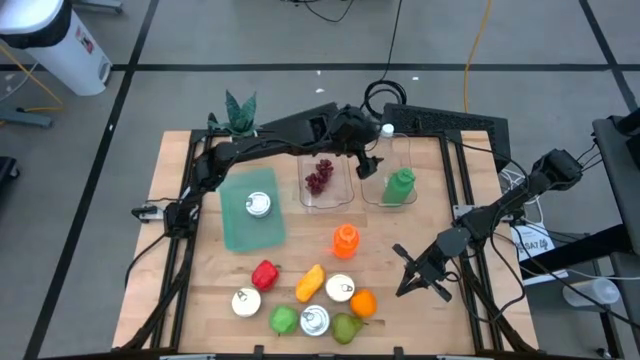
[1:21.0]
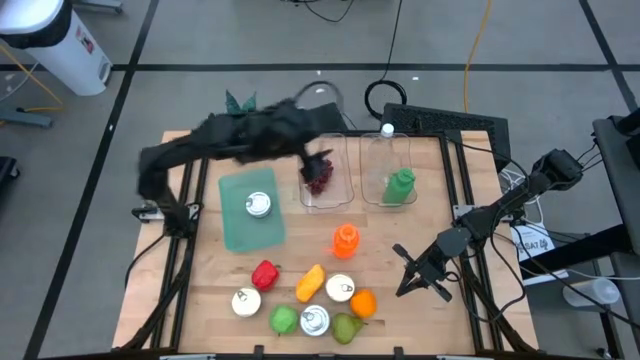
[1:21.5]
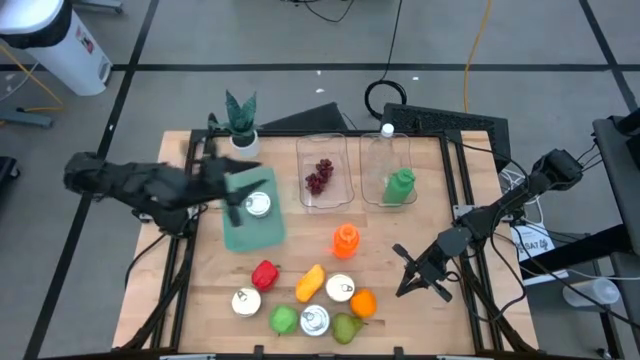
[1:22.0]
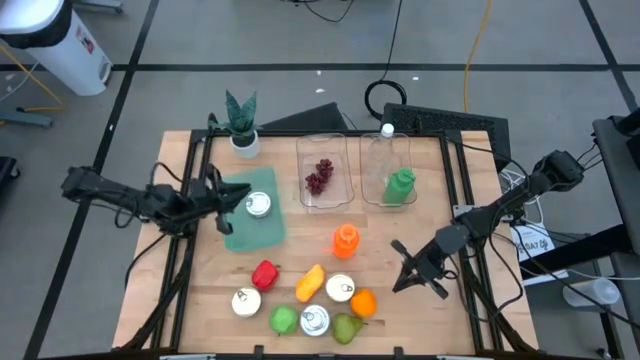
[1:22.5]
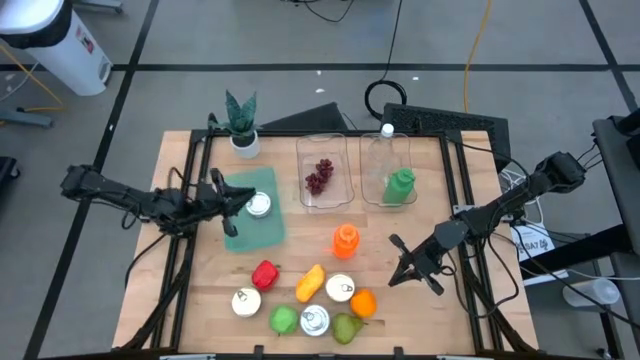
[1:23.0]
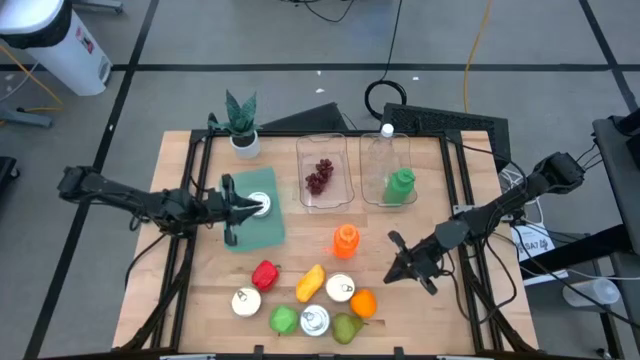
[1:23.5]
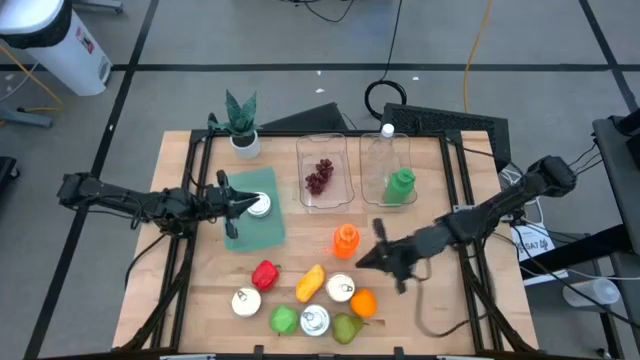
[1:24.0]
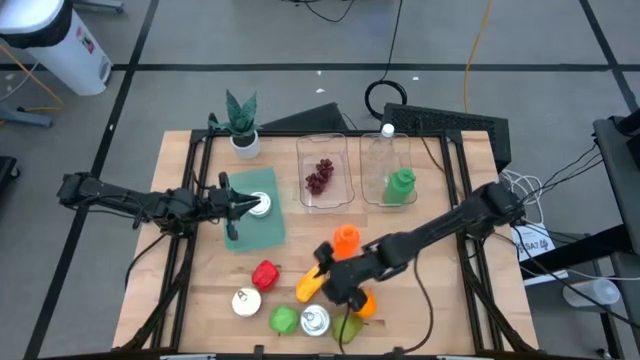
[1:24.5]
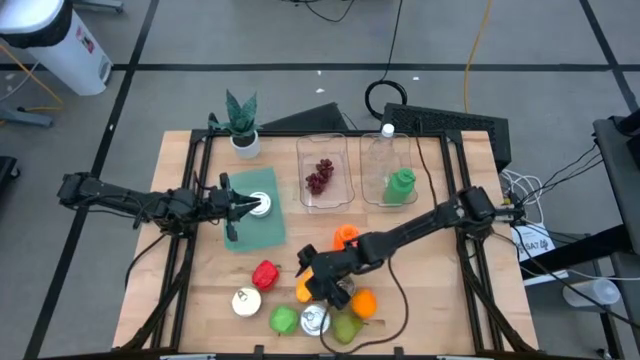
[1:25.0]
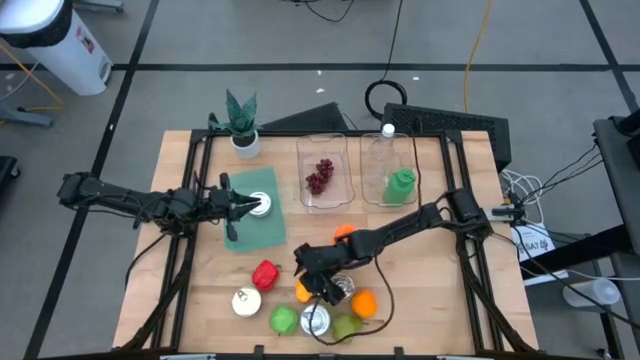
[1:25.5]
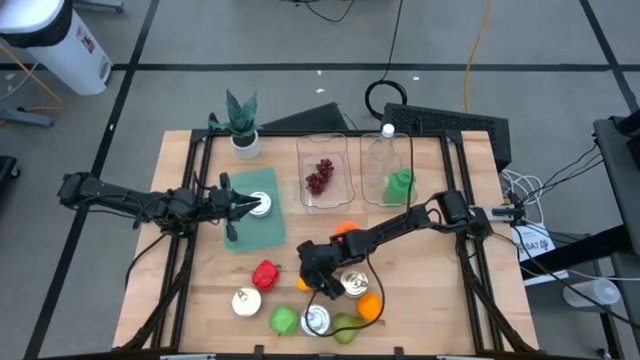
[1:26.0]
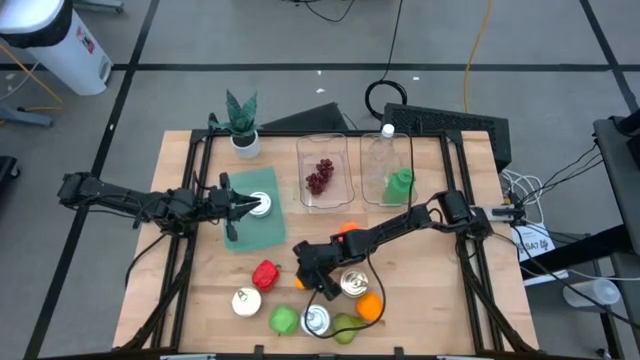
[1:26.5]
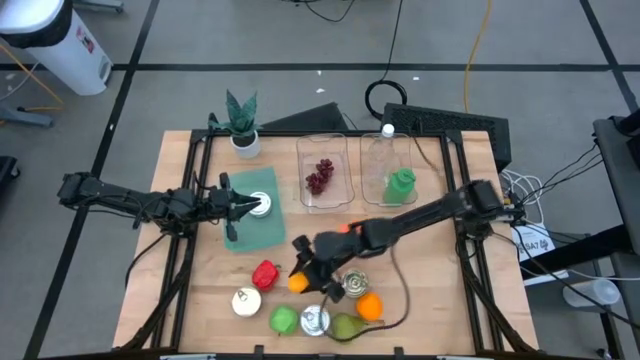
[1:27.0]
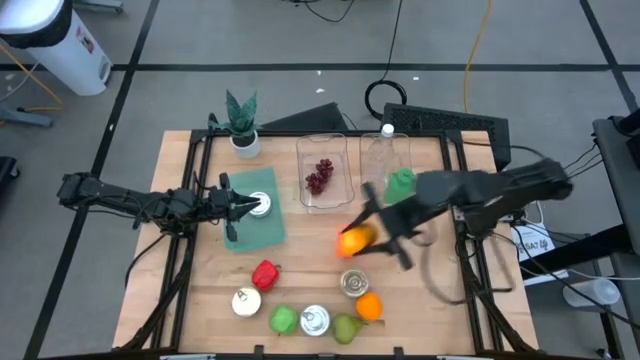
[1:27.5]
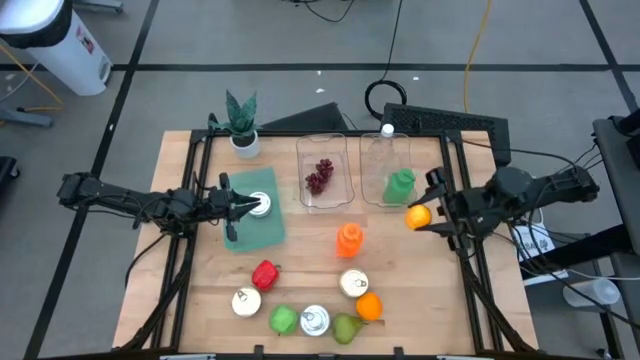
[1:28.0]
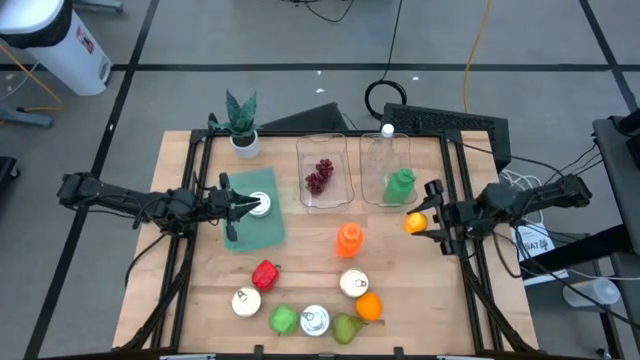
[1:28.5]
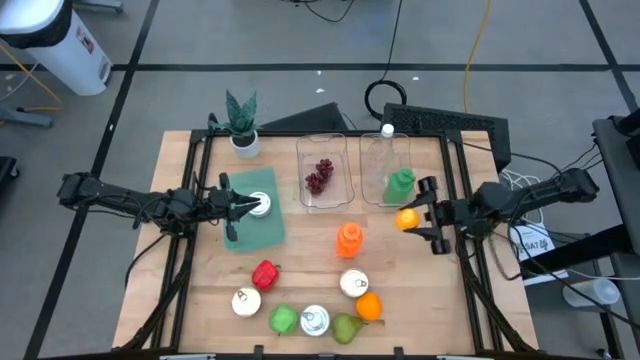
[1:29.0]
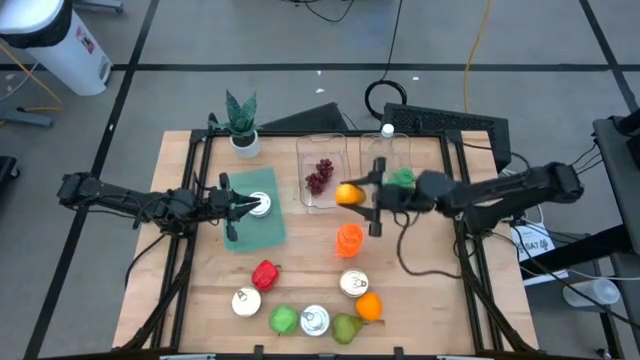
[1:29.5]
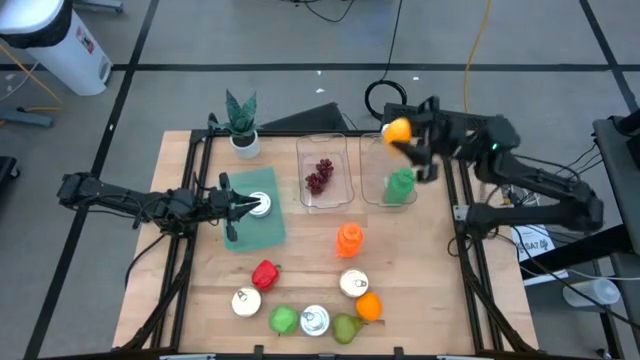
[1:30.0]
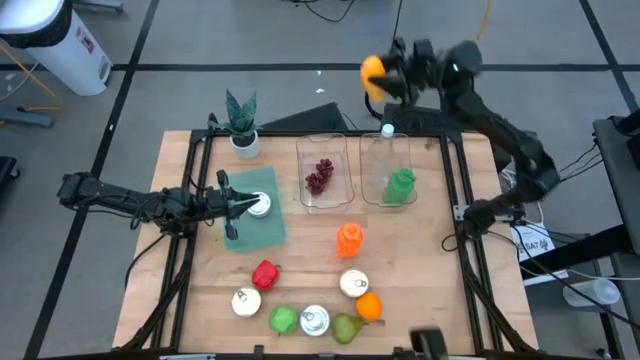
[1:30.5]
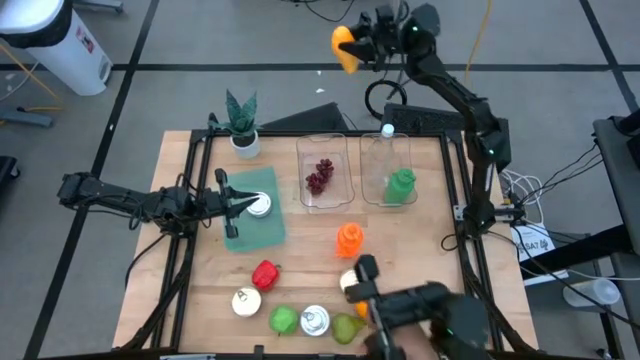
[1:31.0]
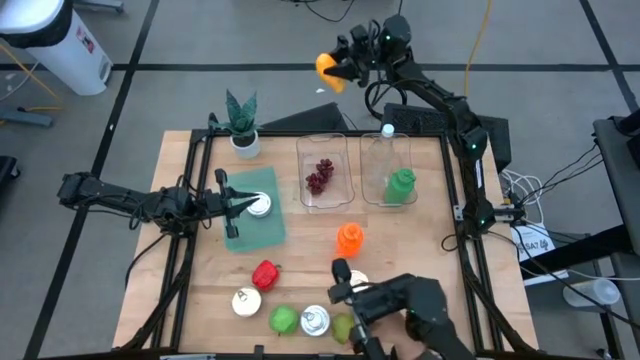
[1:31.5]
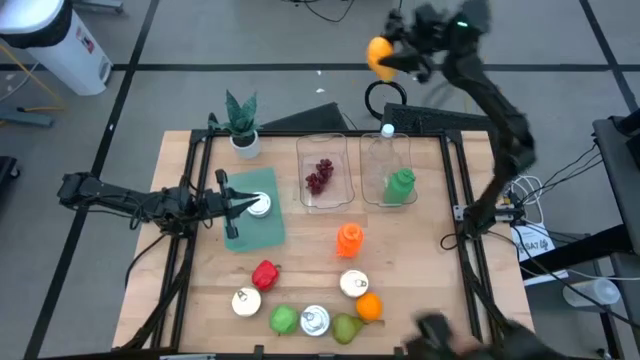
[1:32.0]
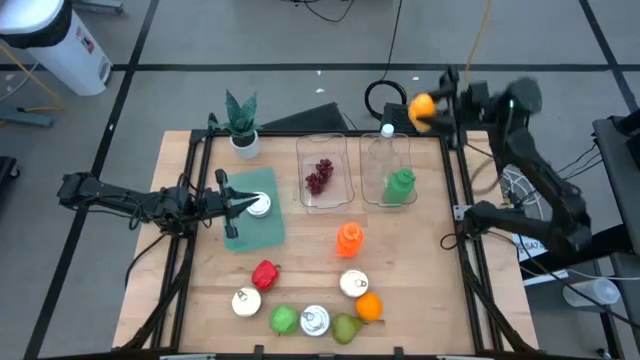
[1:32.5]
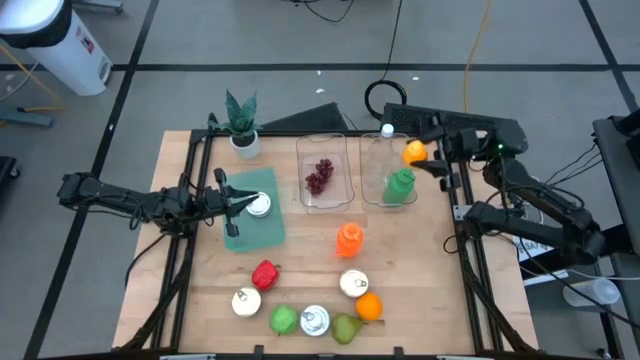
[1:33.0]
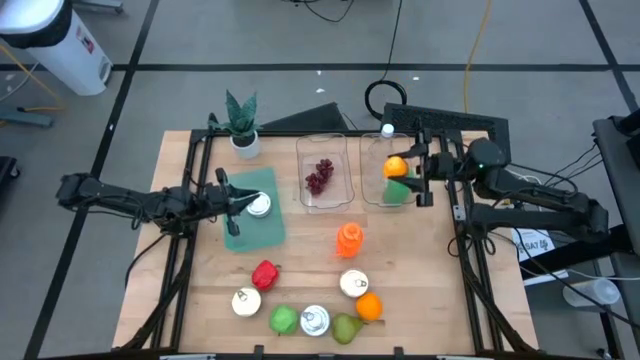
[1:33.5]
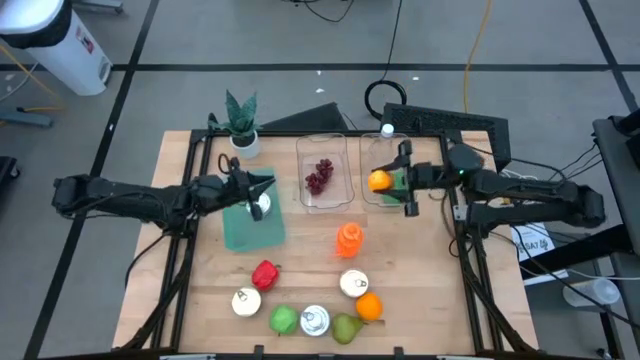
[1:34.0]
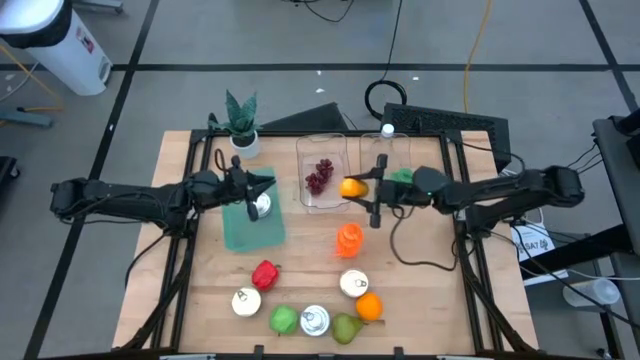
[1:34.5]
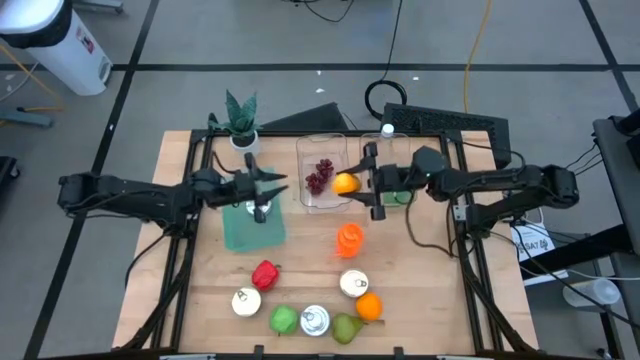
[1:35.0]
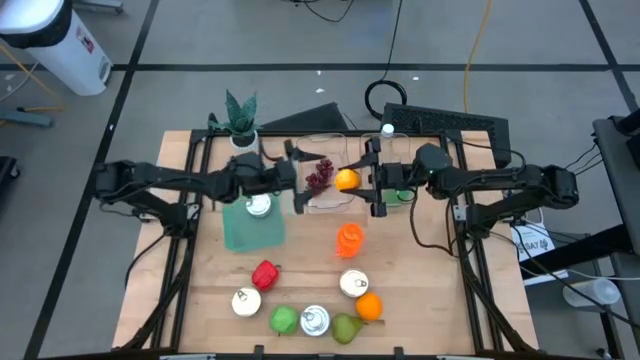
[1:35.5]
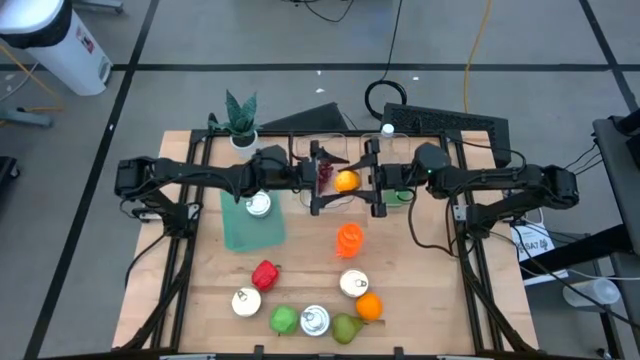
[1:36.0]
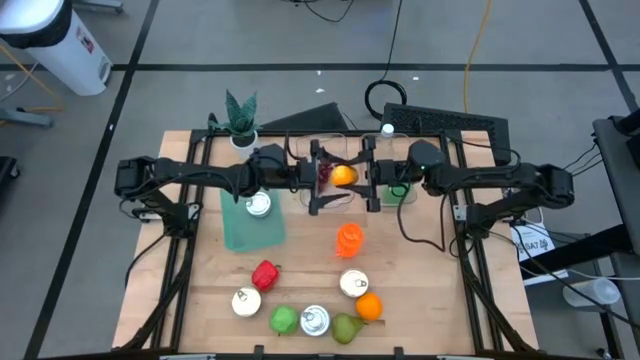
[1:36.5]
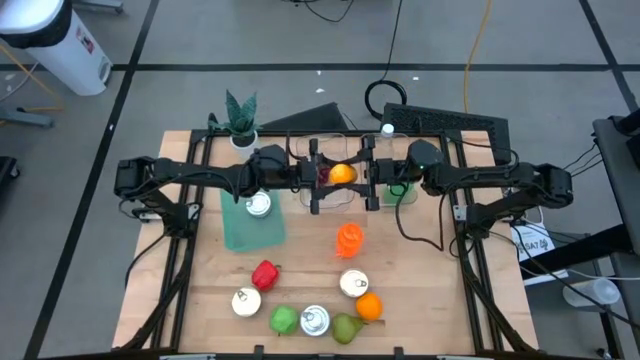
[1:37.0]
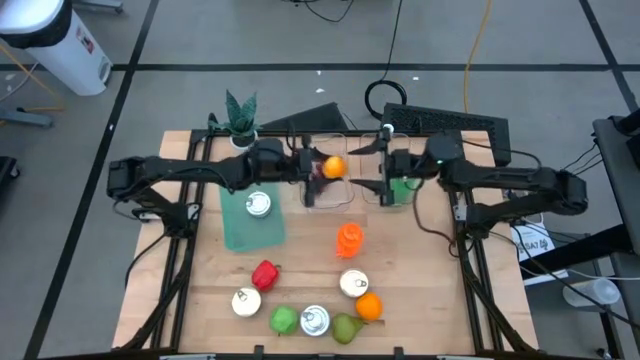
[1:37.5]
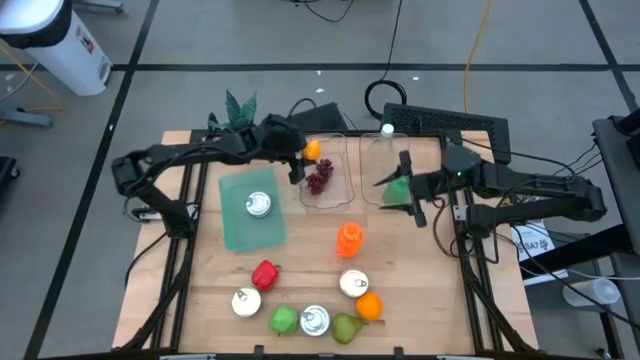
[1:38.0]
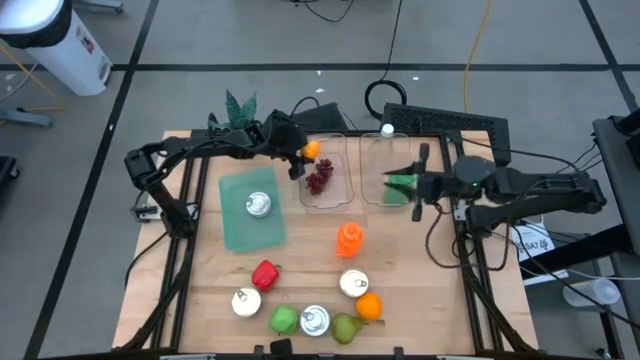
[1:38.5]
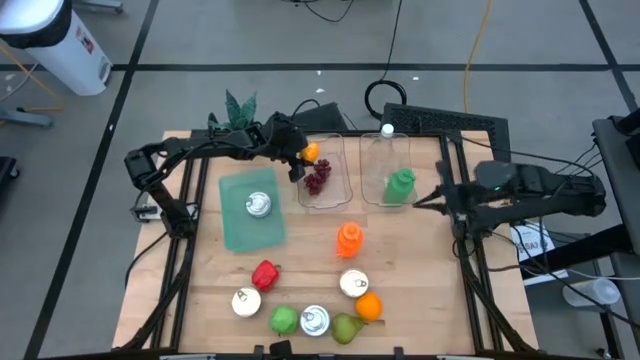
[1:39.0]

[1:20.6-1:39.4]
Task: Pick & Place Food Item
Put the mango into the left transparent bin

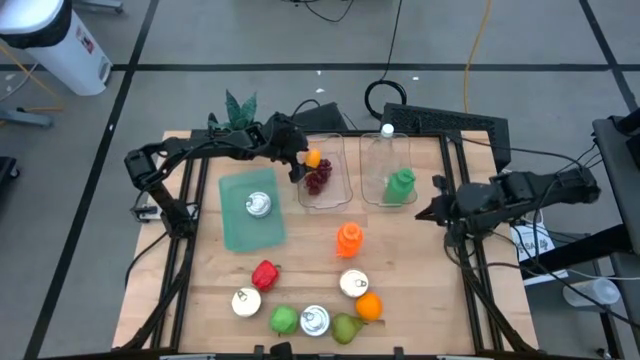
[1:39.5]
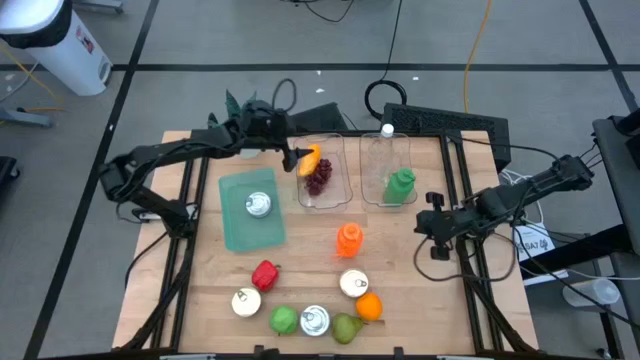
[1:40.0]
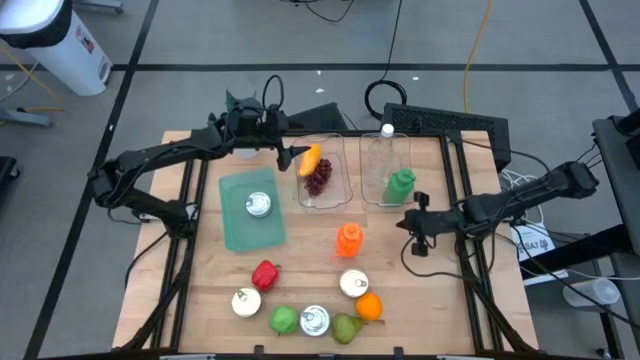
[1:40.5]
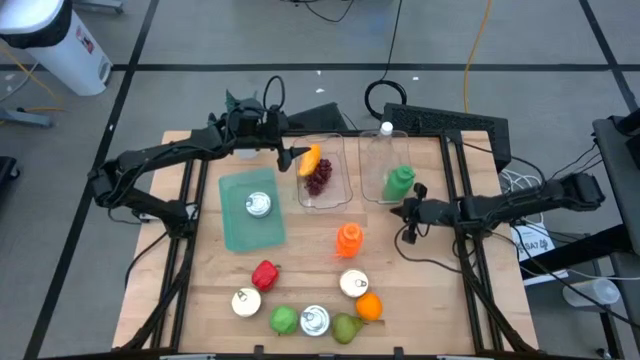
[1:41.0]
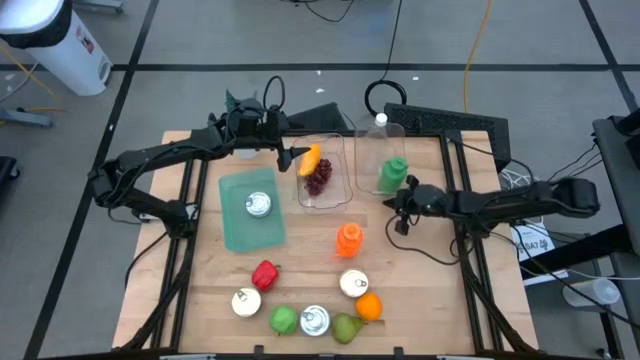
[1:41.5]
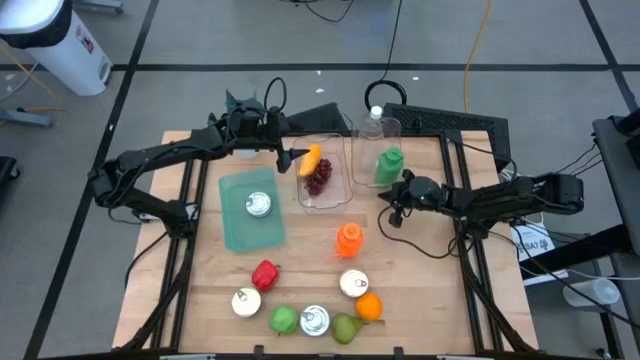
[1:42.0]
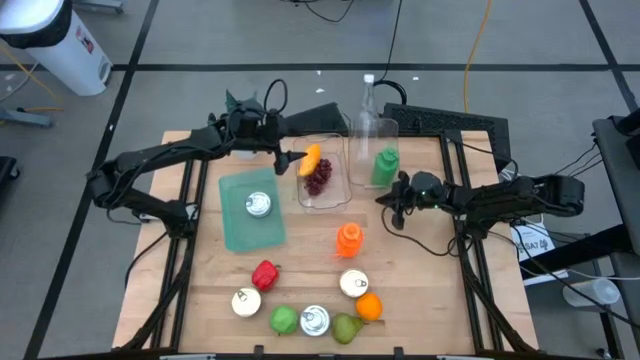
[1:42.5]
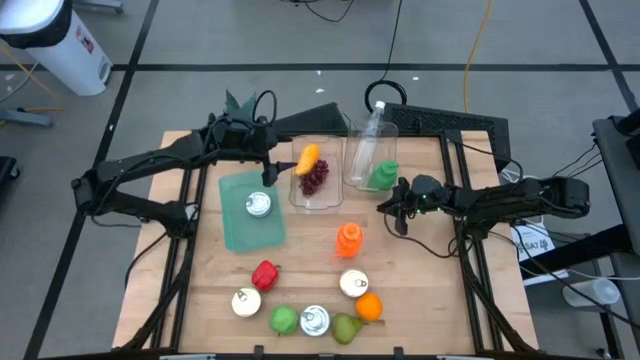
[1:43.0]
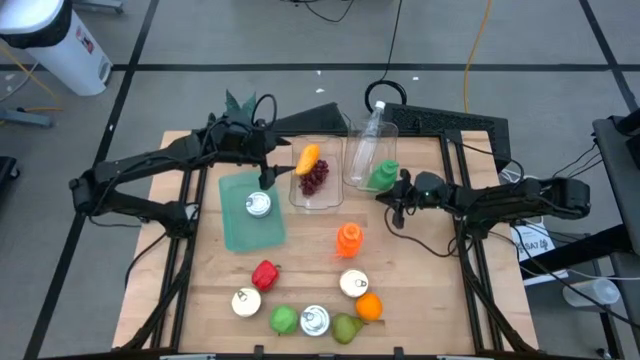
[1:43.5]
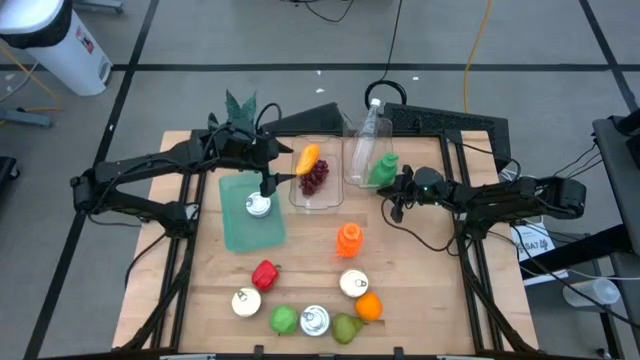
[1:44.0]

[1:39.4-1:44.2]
Adjust the right transparent bin
